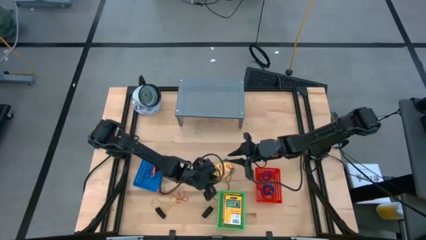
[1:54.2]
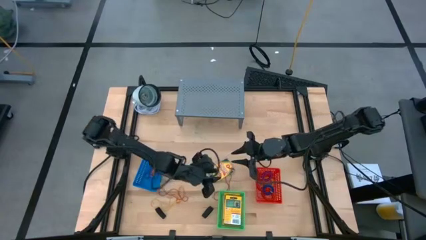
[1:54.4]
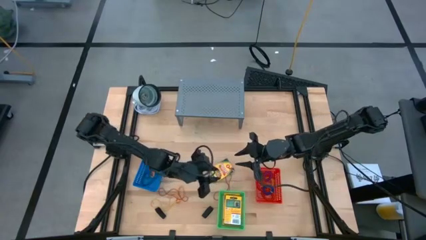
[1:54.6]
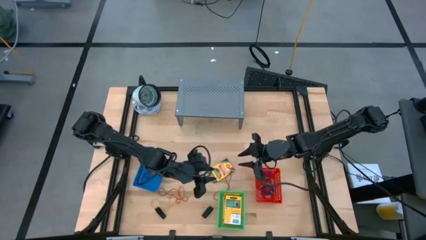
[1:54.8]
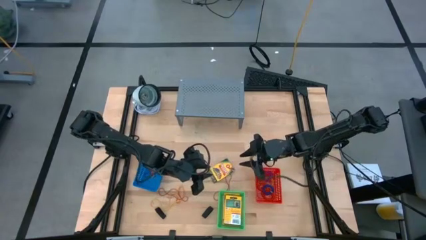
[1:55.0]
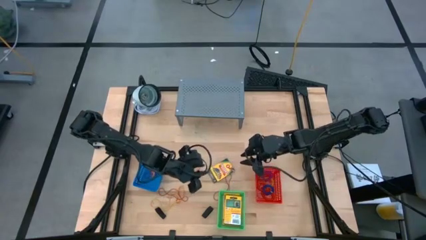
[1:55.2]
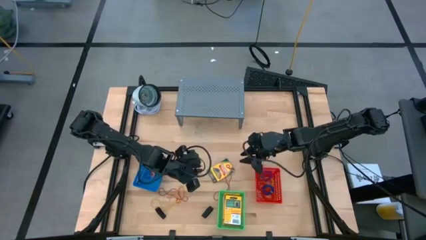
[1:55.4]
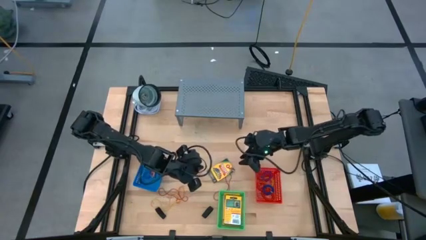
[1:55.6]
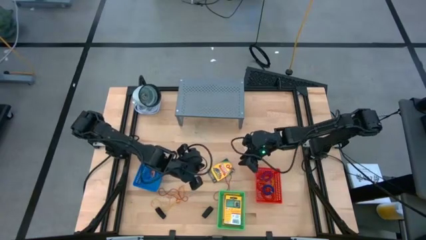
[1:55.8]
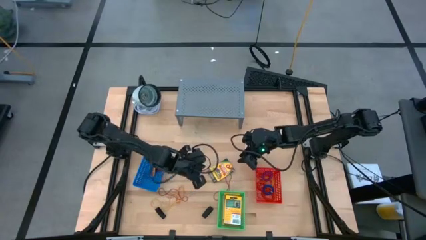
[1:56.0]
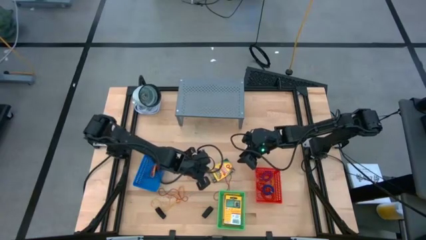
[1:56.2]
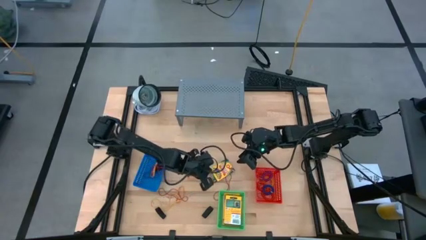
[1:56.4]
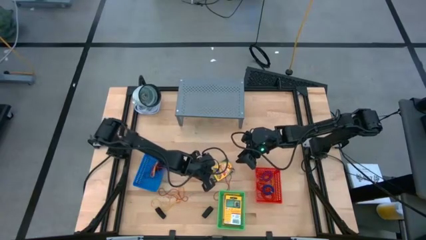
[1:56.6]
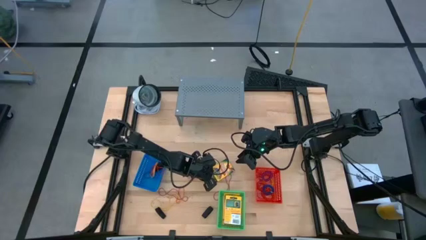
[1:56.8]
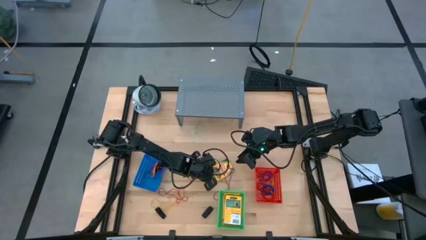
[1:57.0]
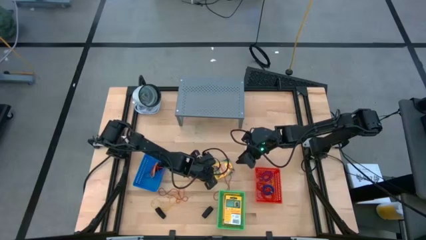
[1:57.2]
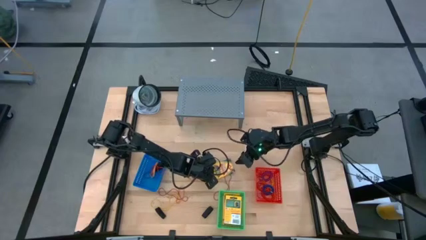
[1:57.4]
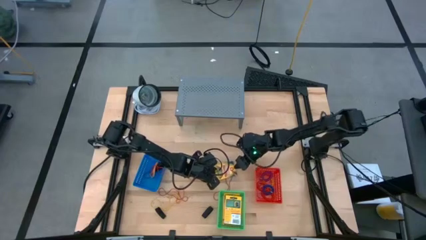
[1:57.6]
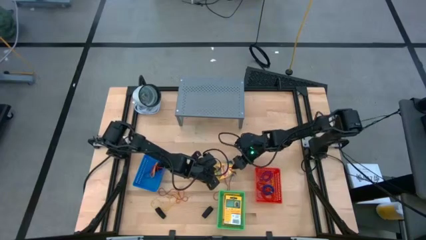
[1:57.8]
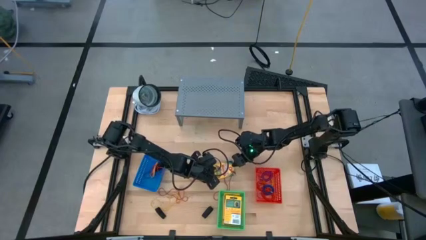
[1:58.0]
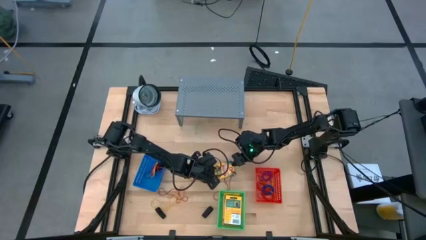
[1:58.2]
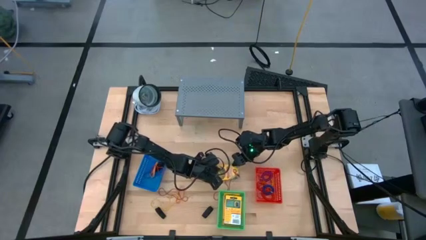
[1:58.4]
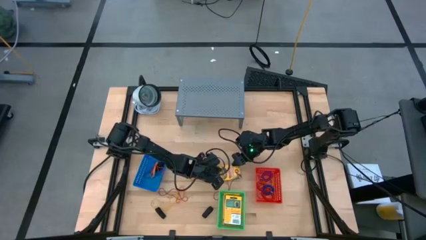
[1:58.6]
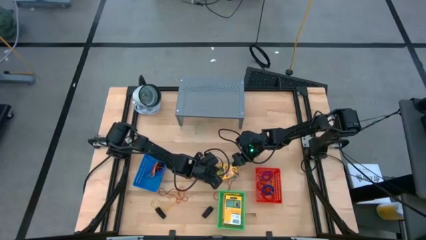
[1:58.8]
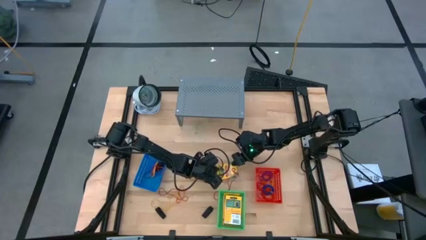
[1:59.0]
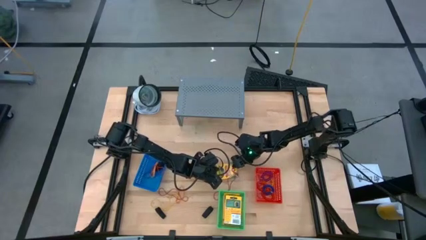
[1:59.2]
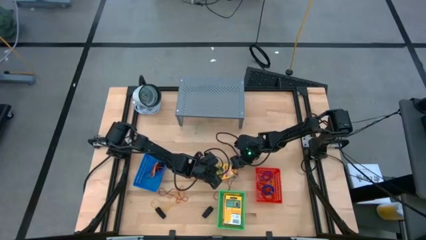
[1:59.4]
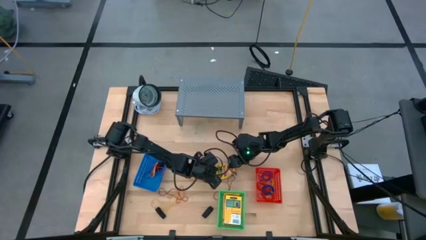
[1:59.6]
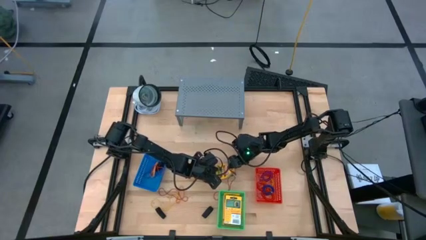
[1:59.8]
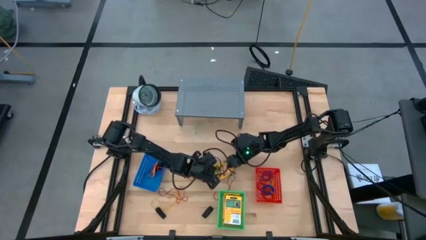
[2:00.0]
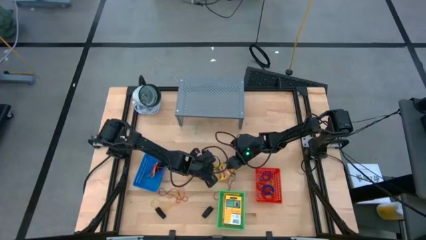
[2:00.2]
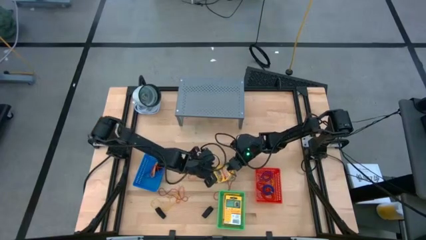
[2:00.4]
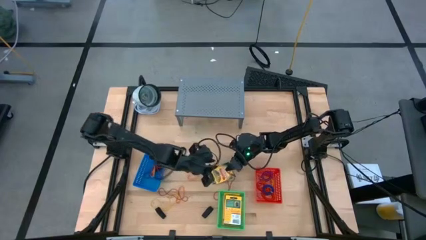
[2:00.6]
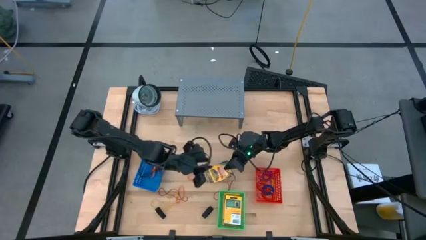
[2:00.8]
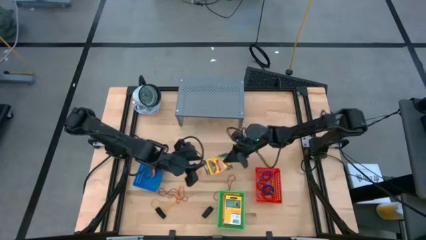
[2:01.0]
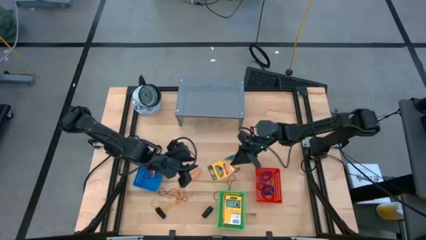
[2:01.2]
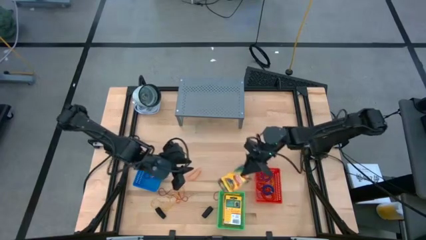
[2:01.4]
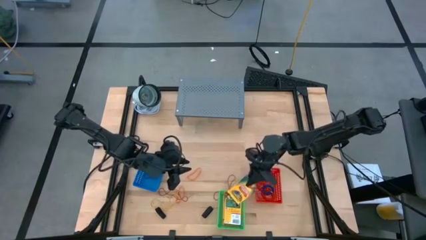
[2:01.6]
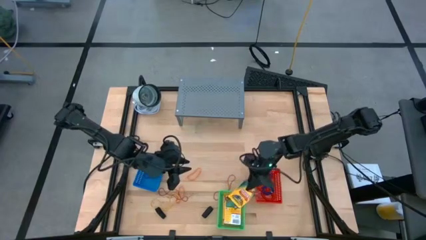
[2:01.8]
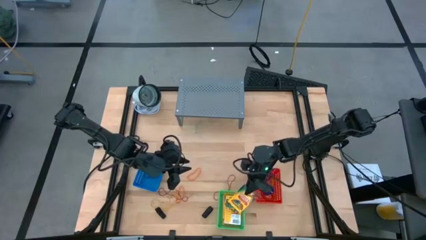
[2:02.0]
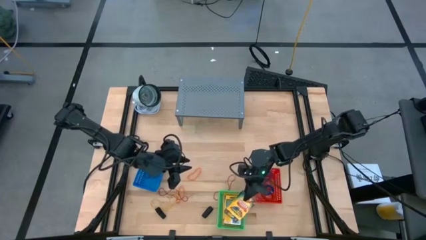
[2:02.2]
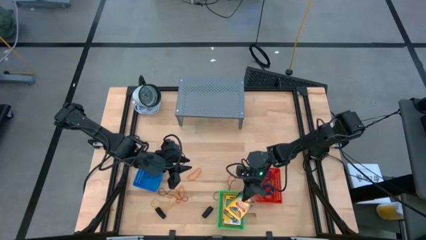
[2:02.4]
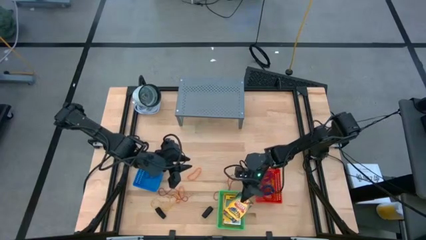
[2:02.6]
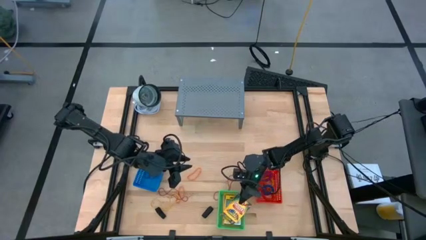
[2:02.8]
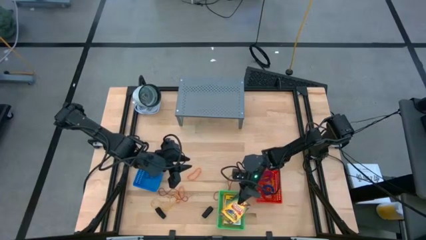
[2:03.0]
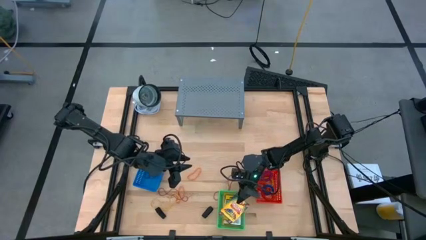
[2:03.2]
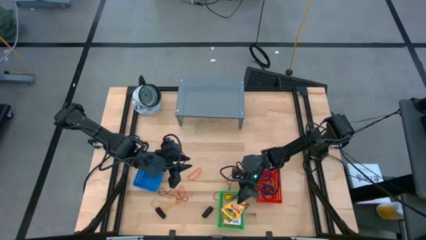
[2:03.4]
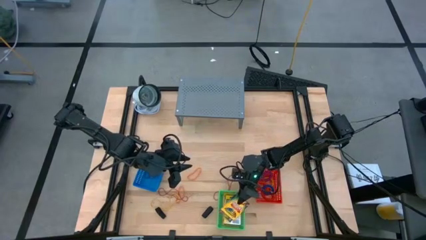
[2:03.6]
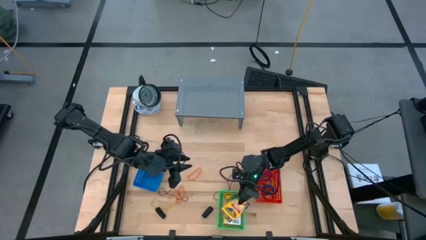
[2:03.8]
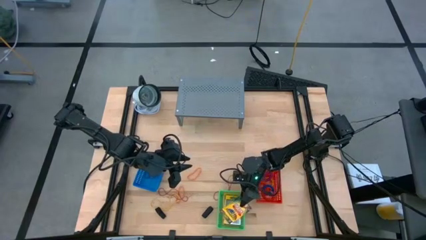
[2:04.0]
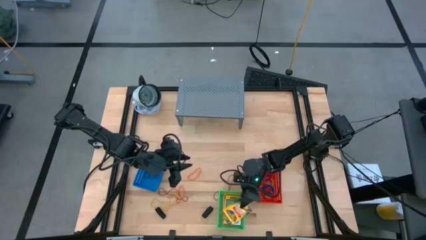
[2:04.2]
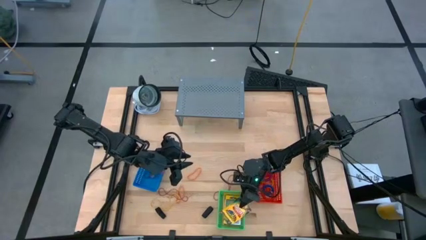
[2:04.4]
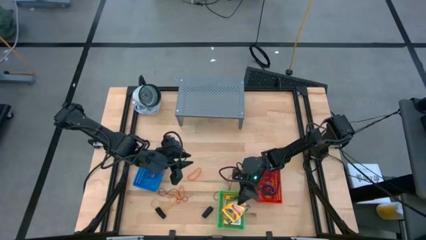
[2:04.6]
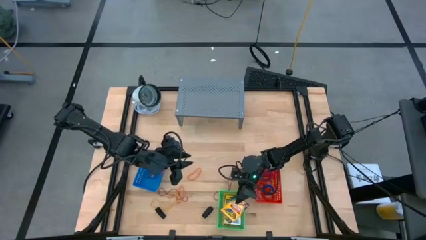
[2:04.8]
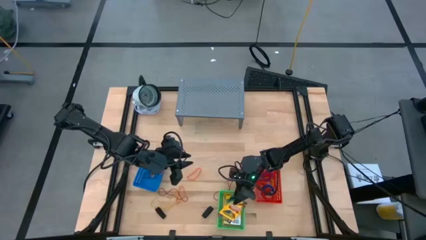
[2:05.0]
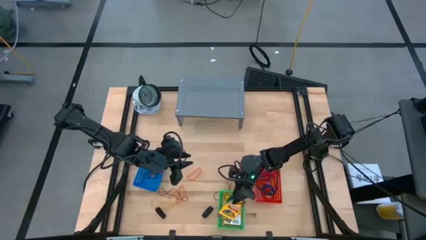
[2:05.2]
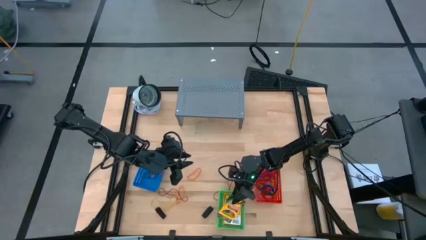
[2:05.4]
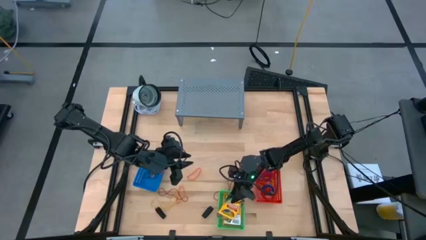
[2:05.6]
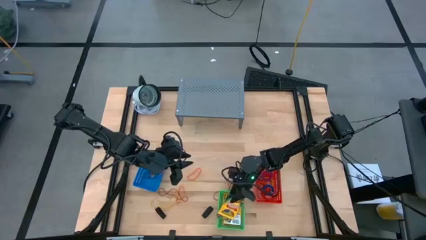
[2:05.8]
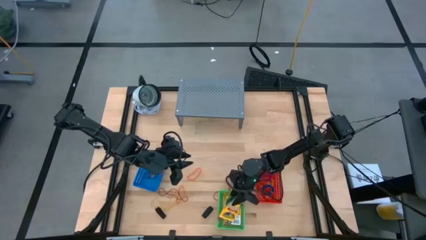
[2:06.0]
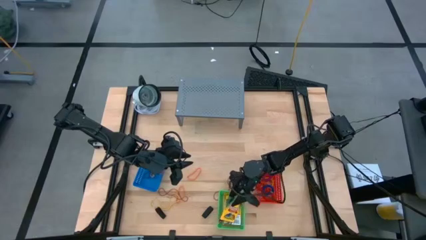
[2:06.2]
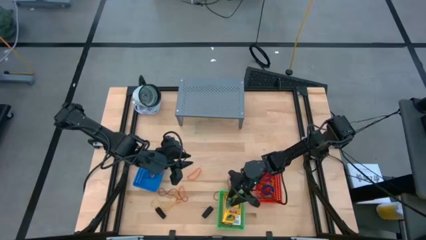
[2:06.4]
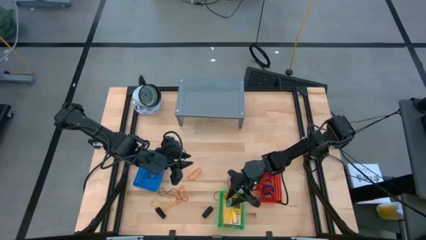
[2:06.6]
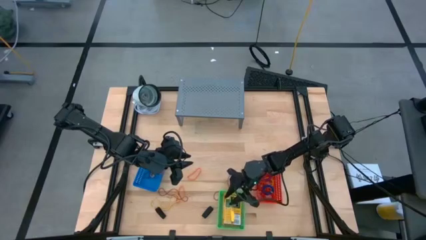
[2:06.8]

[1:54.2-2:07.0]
Task: Pick & Place Office Desk Supplies
Put the yellow crayon box into the green bin
